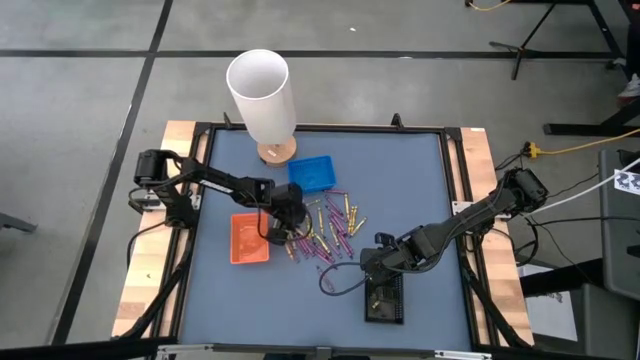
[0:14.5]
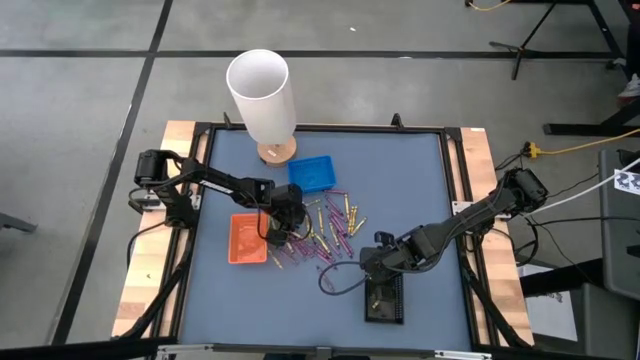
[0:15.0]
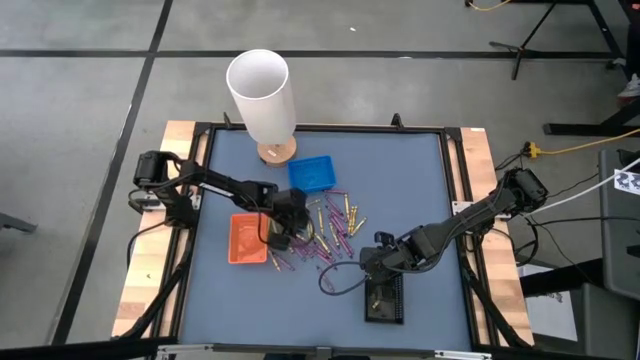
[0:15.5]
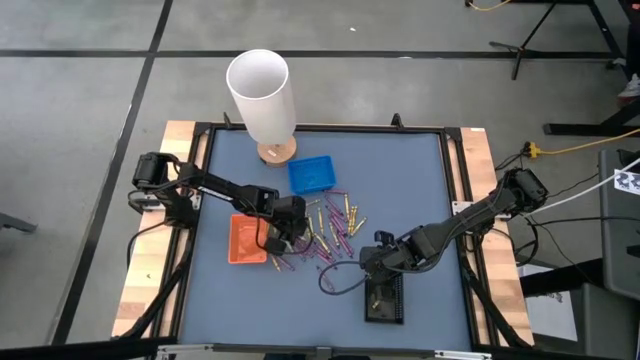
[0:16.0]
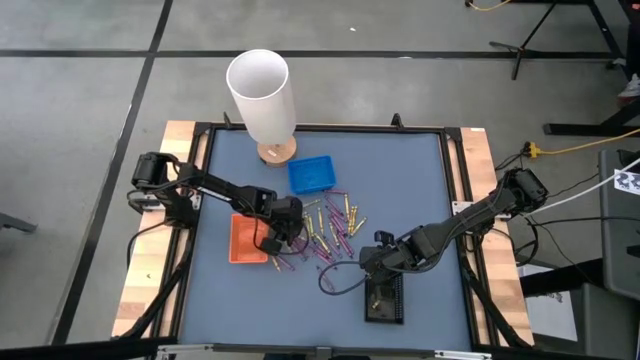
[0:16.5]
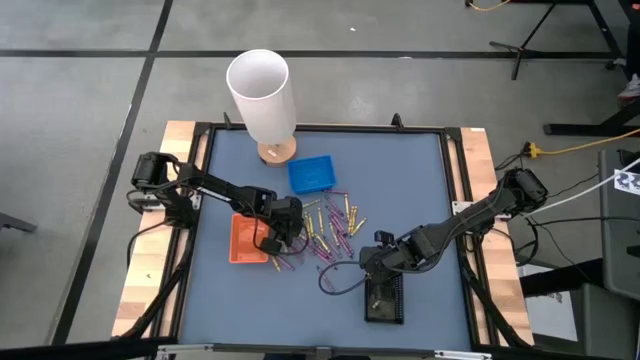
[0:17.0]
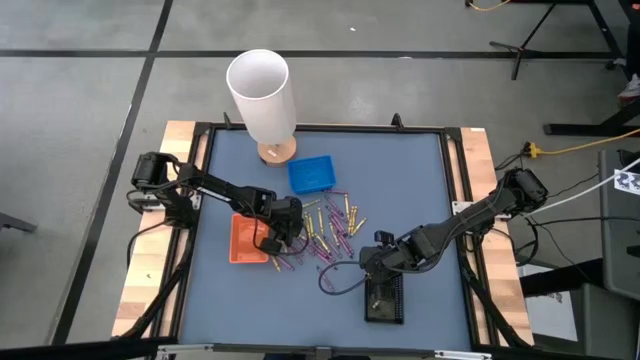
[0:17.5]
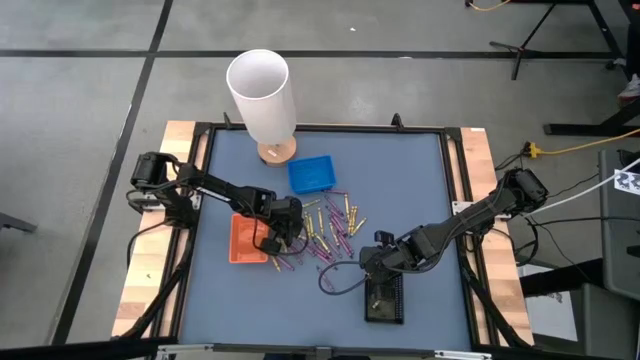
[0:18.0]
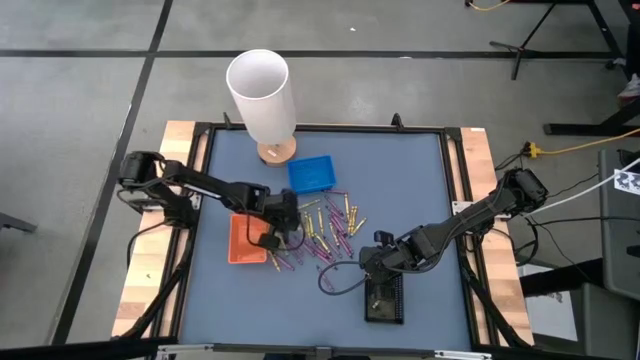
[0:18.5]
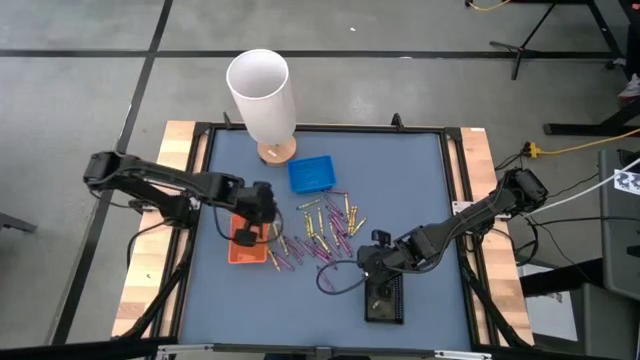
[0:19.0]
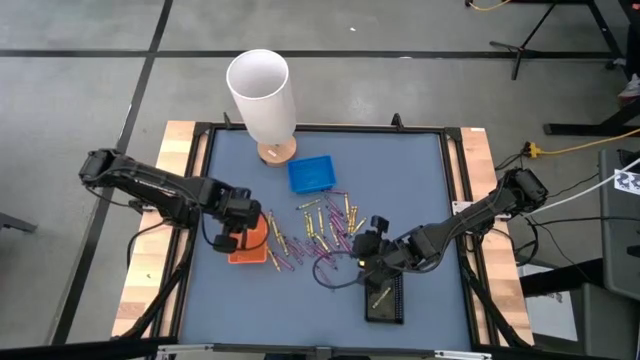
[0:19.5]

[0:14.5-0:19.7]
Task: Sort crayons
Put the yellow crayon into the orange bin

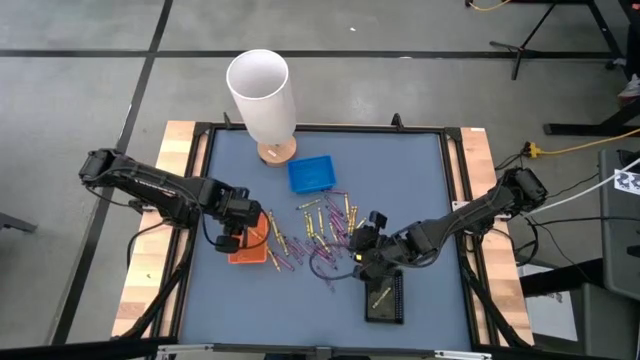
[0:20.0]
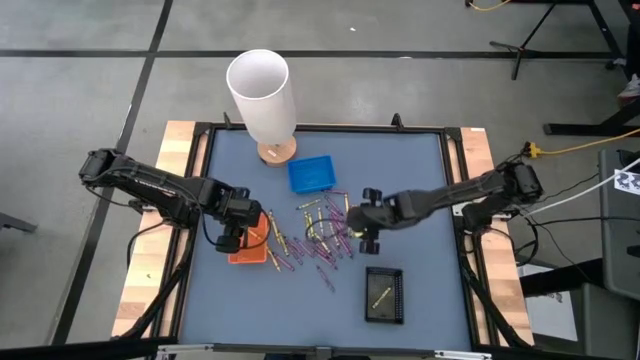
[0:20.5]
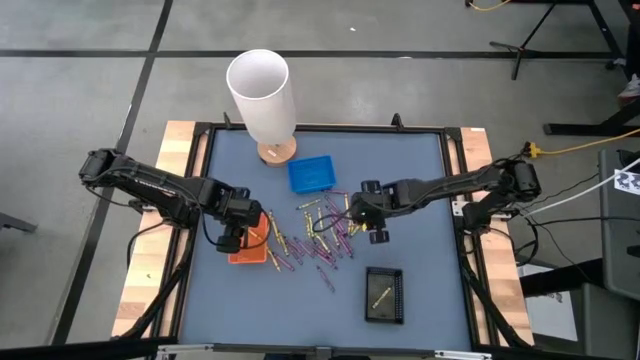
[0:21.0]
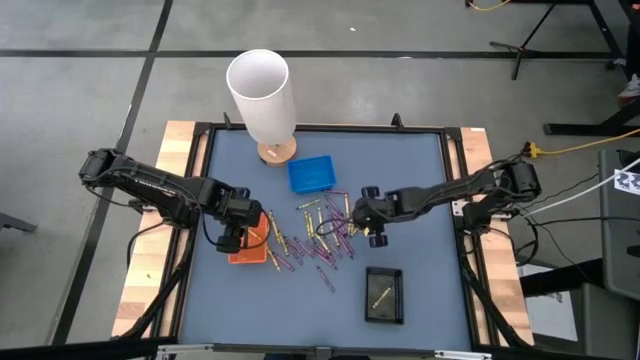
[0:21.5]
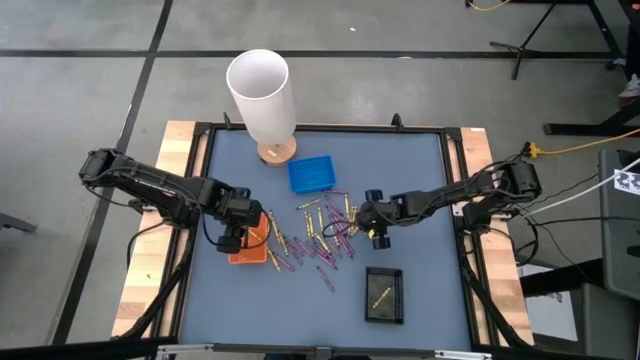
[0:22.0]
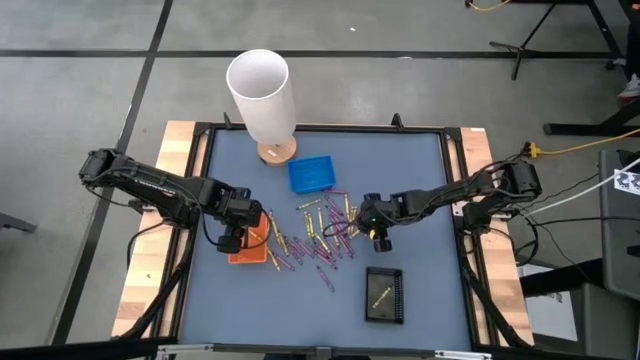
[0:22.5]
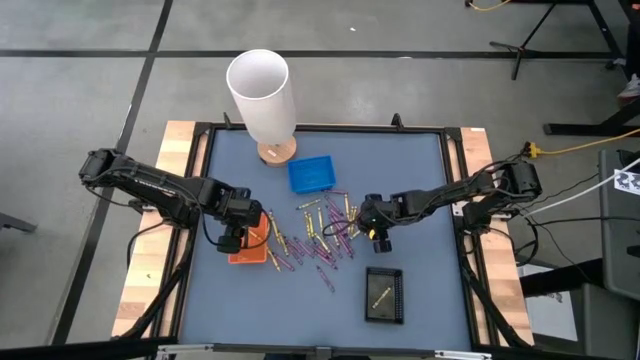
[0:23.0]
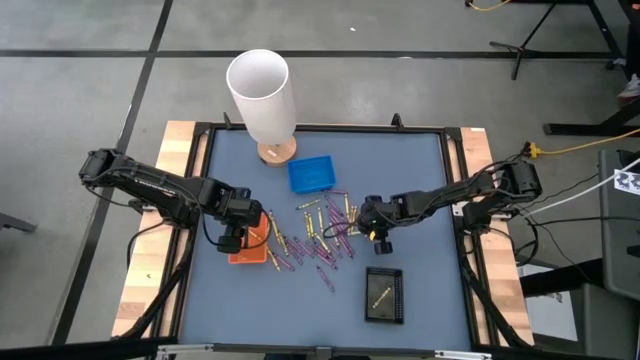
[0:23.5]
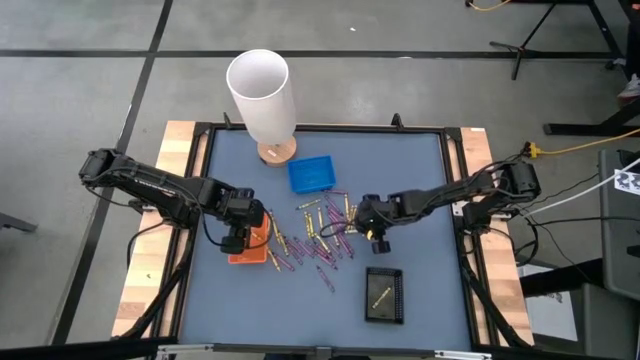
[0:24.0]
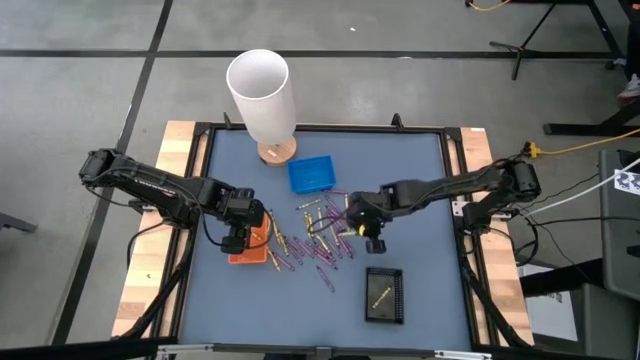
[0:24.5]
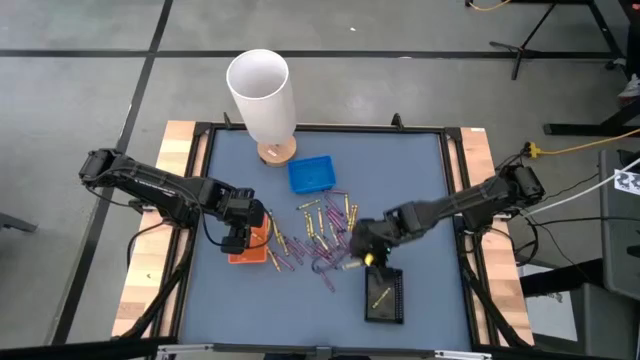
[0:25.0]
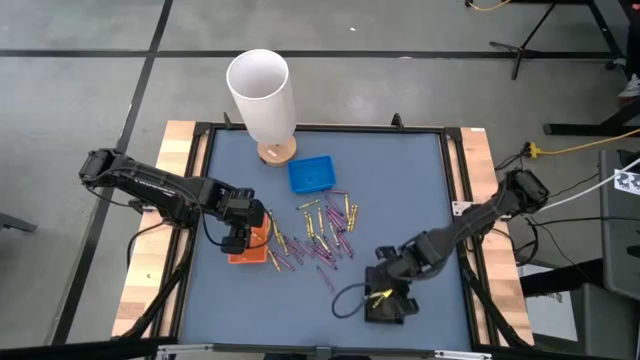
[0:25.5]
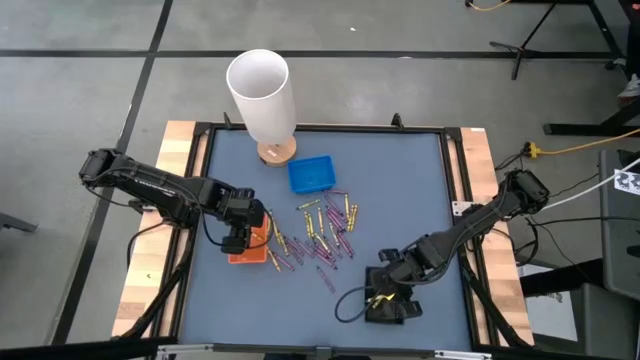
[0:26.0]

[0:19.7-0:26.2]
Put the green crayon into the black bin

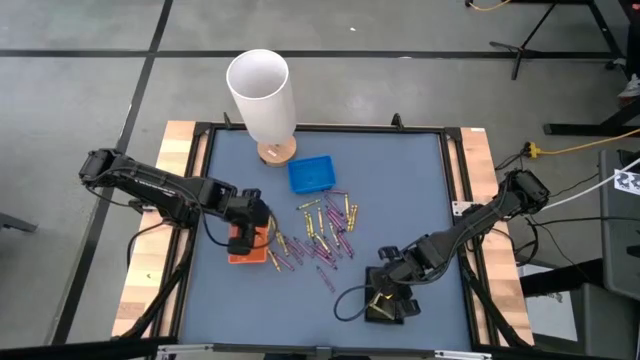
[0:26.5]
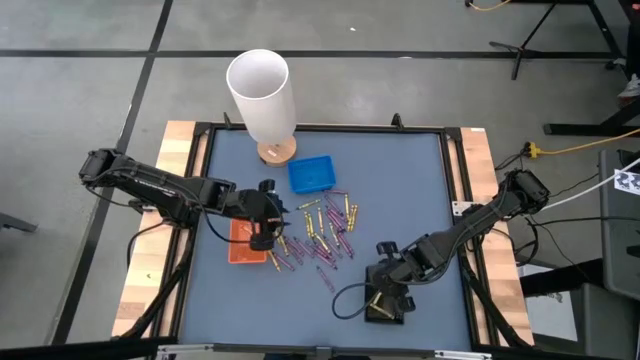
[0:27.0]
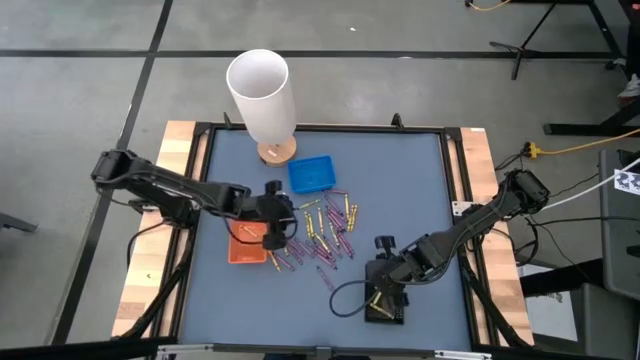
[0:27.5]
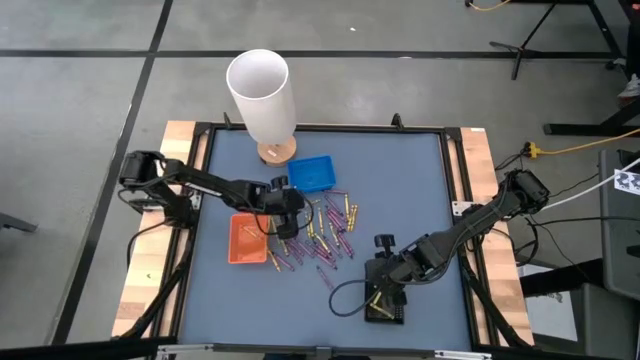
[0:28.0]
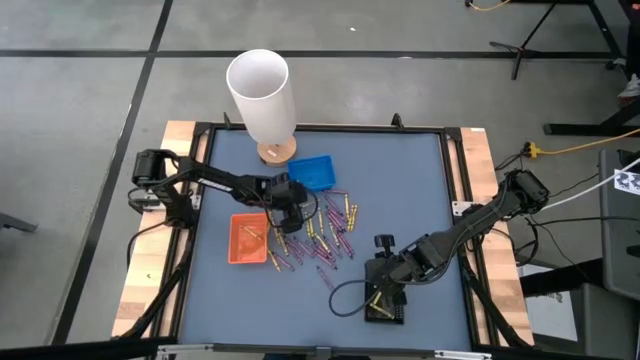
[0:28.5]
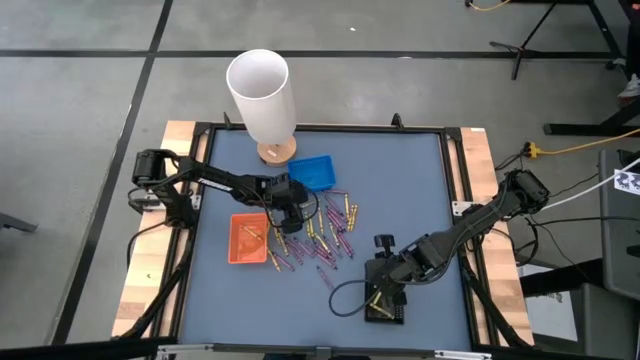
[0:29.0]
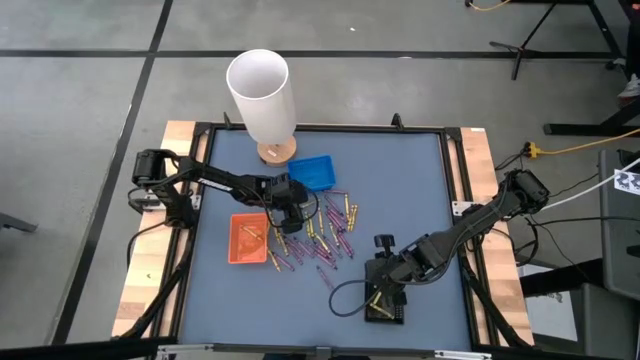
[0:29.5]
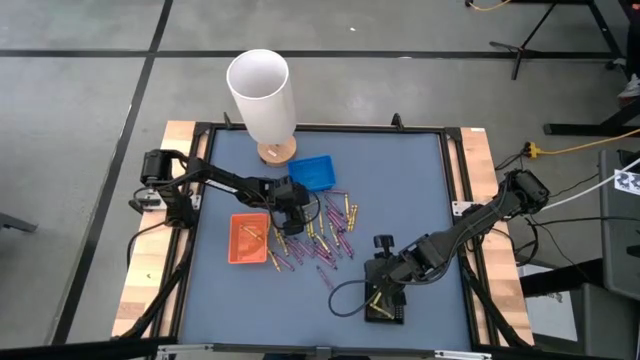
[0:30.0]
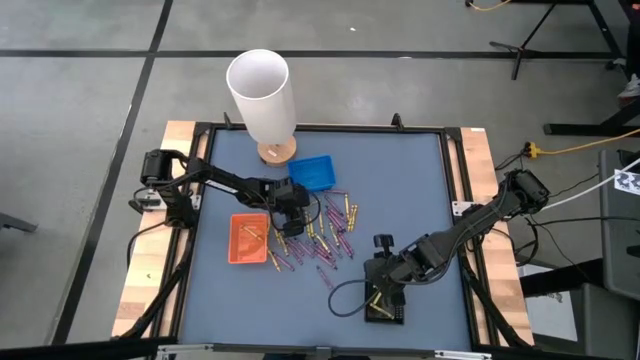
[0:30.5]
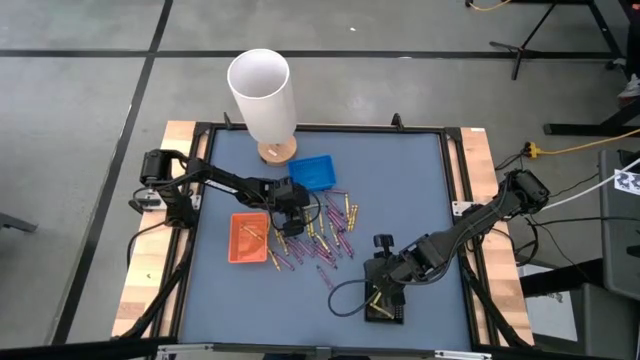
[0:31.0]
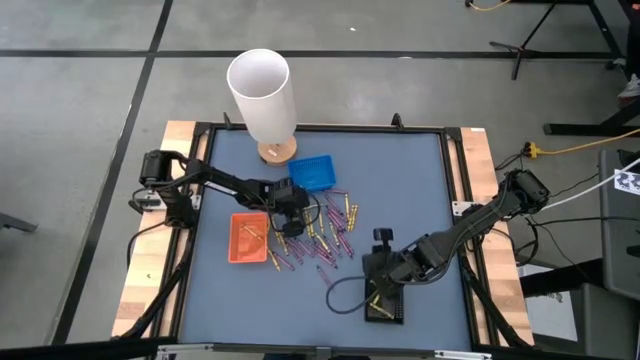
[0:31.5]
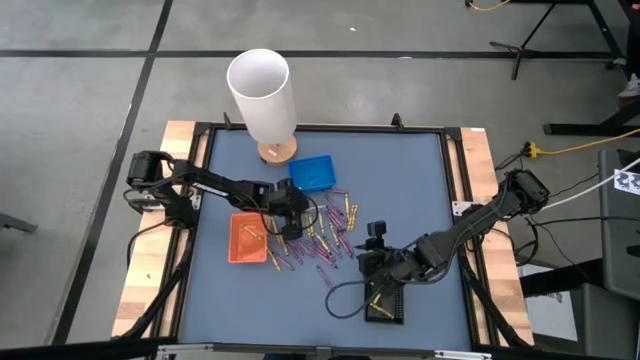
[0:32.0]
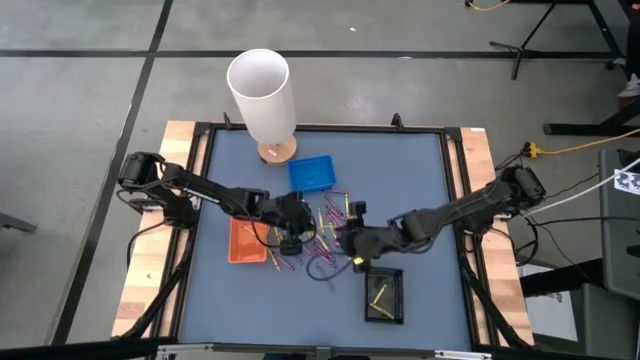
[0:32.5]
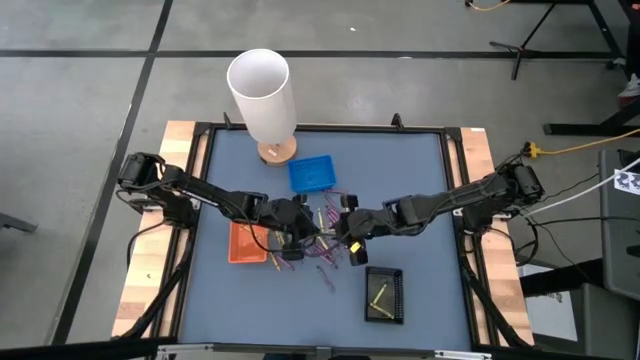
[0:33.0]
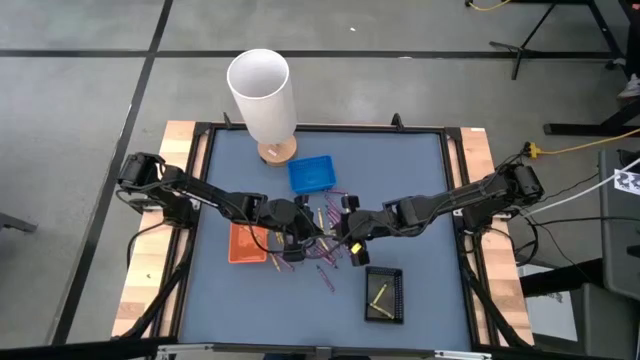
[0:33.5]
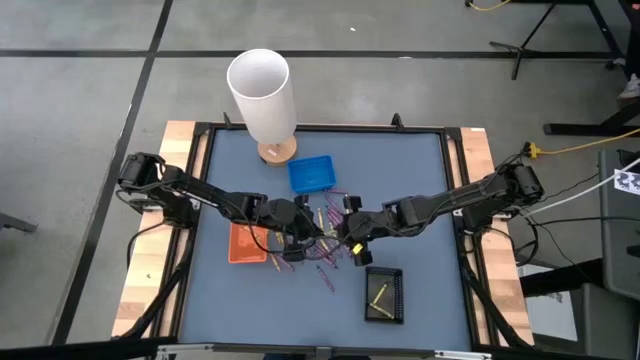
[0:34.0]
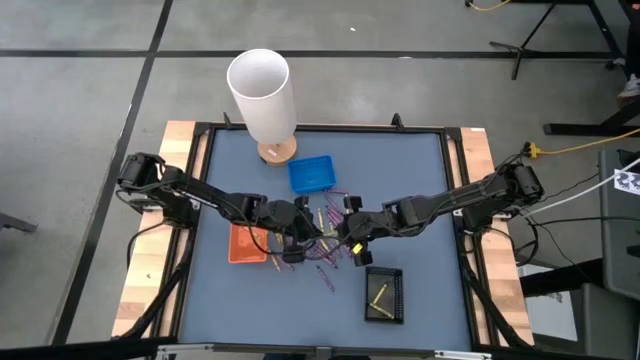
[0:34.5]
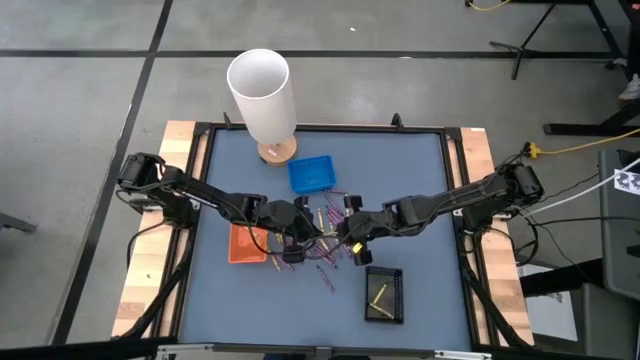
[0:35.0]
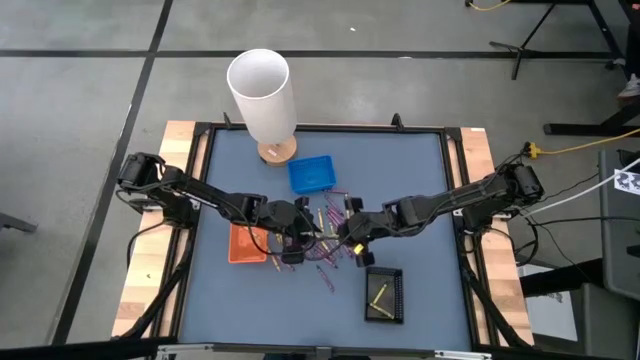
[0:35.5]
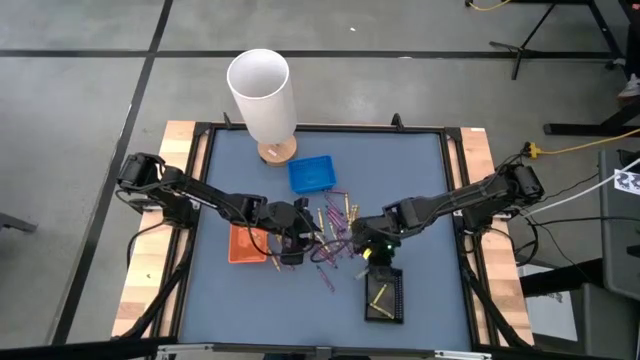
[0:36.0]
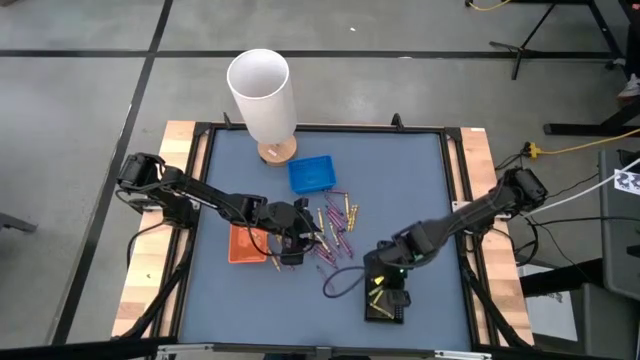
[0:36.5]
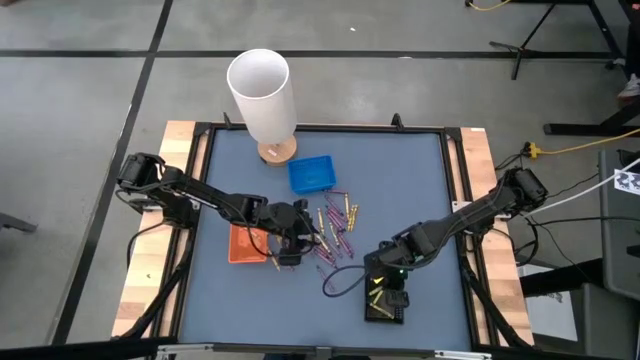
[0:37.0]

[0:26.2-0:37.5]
Put the green crayon into the black bin
